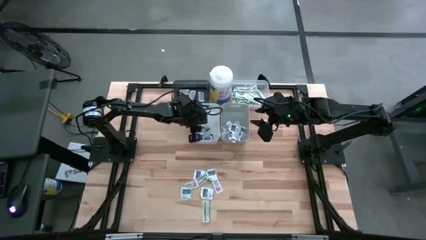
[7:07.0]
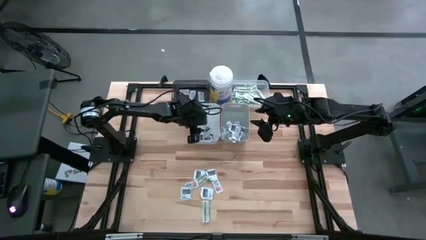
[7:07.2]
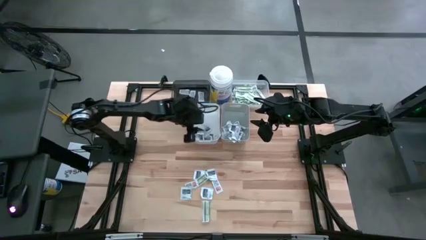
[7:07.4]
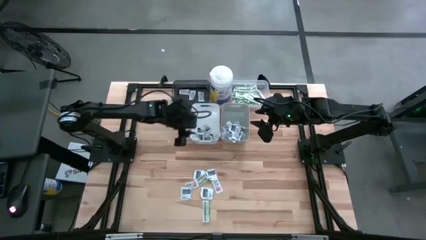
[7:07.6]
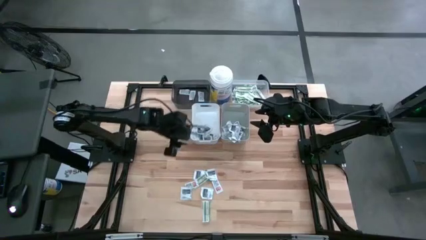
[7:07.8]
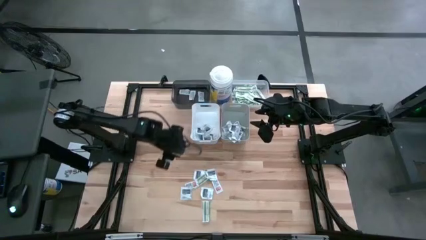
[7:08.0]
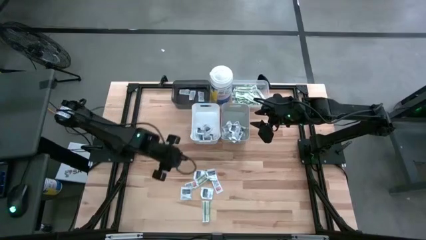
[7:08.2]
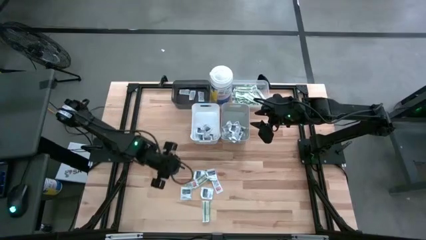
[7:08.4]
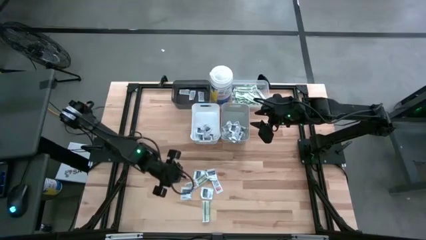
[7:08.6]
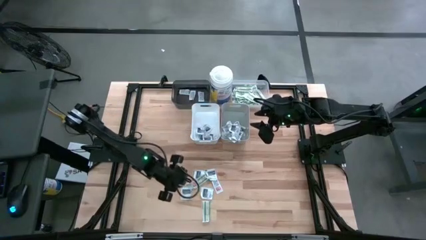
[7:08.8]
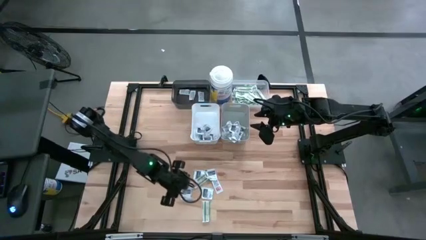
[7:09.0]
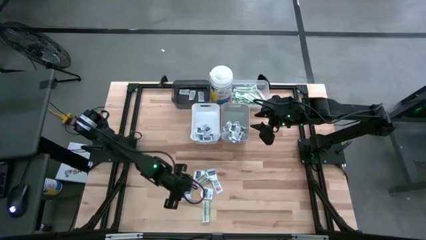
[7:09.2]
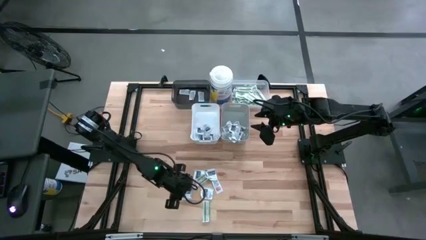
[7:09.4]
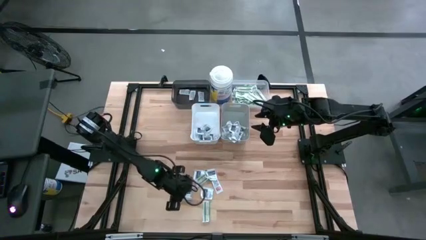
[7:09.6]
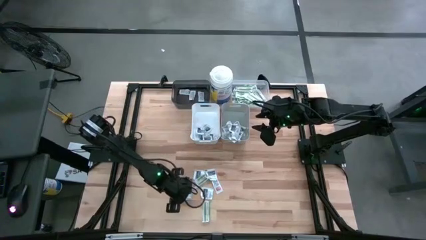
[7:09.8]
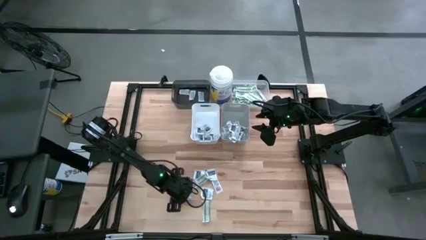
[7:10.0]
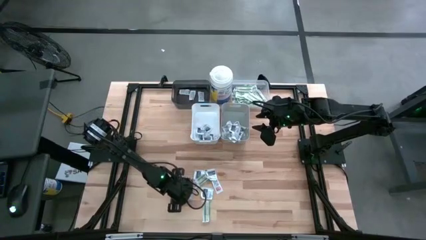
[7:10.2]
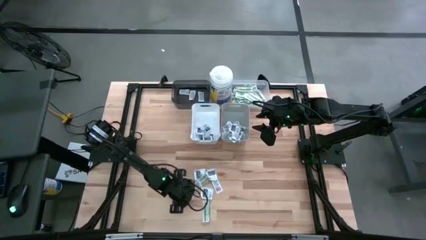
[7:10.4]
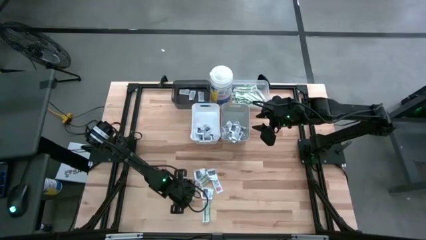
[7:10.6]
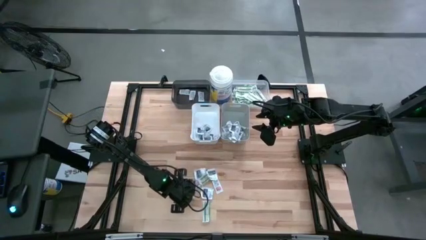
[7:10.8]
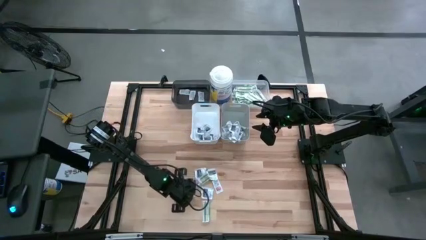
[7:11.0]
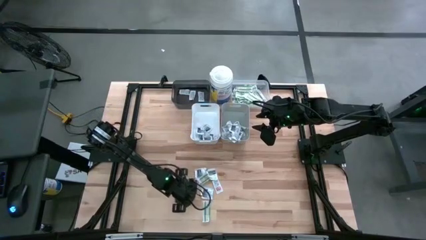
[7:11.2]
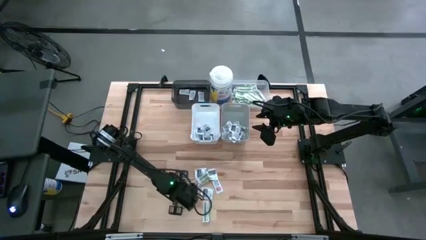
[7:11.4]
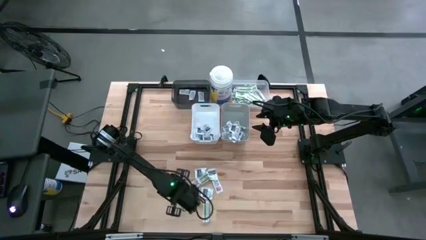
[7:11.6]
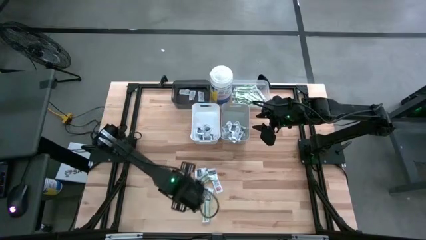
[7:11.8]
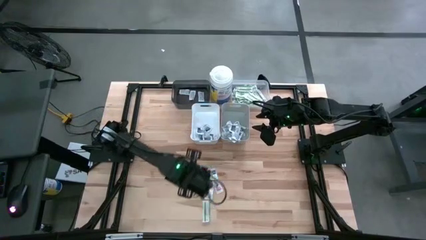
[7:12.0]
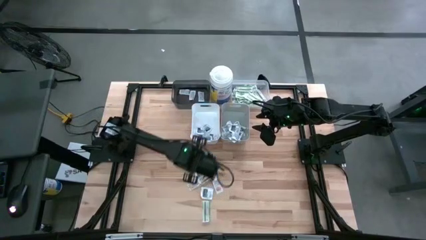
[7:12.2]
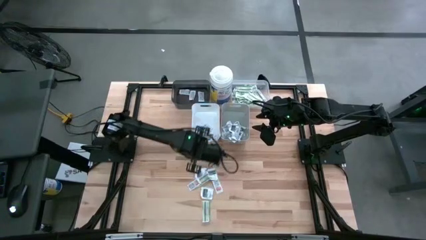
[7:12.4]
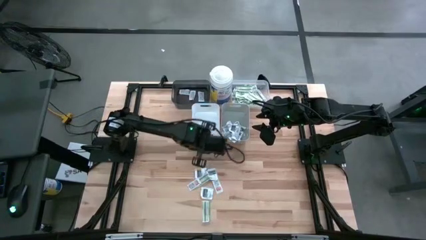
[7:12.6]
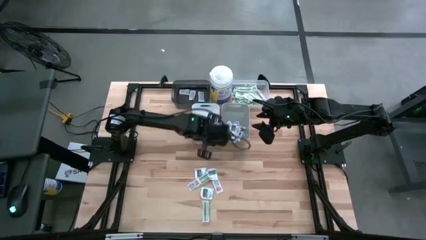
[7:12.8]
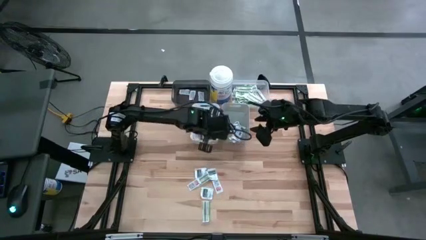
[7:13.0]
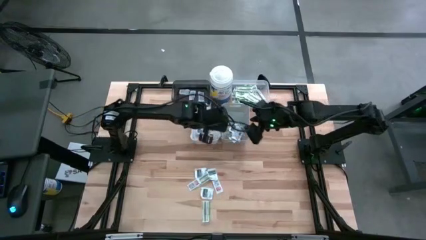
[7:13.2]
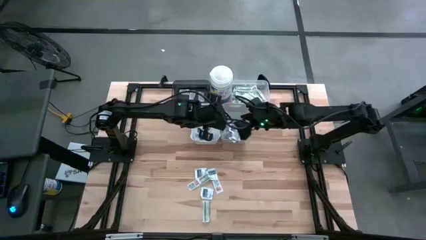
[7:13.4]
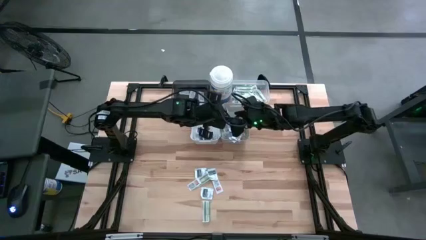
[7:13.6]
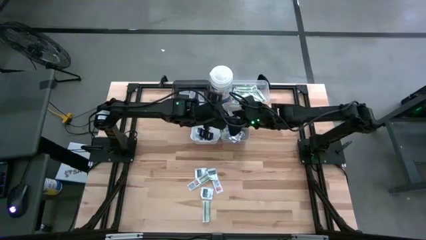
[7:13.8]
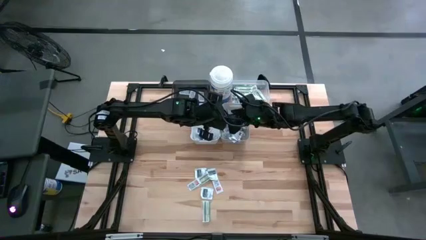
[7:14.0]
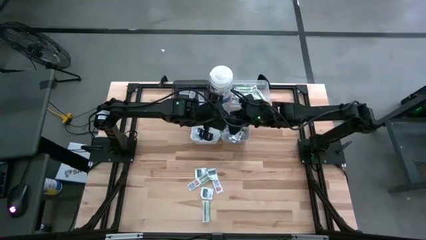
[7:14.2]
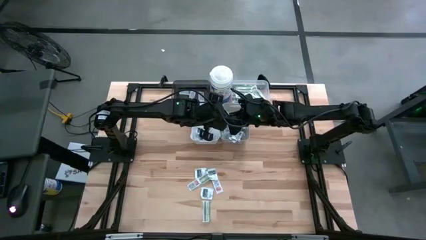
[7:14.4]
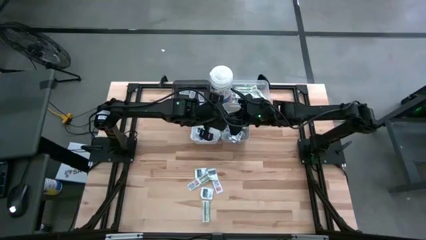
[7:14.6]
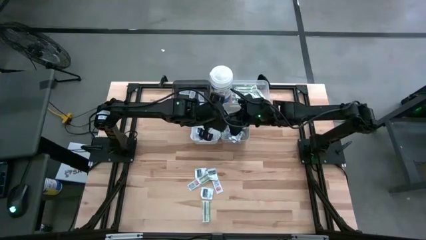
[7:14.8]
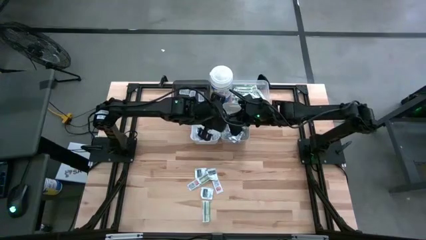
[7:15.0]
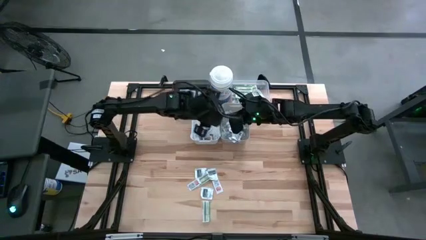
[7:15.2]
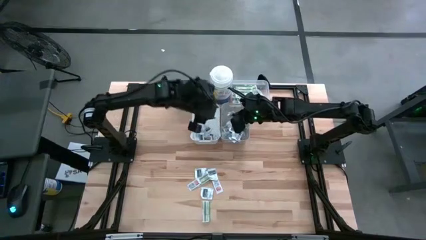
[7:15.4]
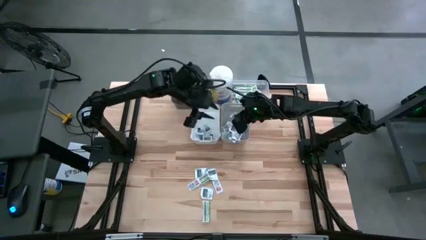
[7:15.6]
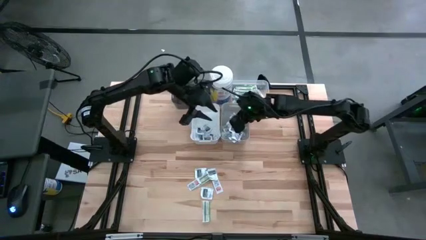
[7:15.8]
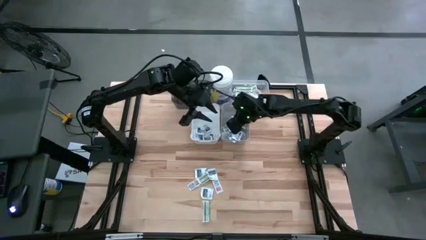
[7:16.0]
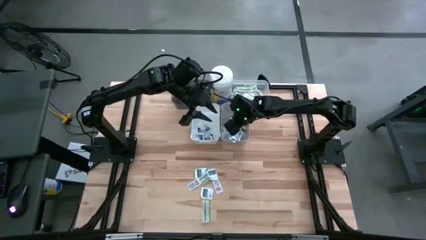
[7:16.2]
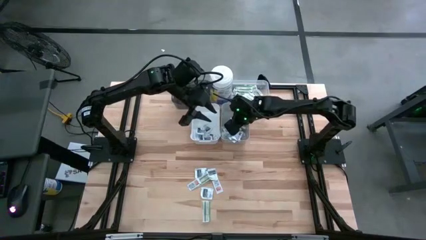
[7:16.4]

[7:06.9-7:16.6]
Task: Pick & Place First Aid Supplies
Put the wipe into the gray bin

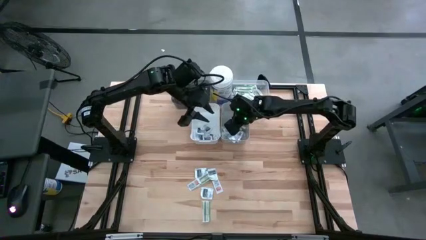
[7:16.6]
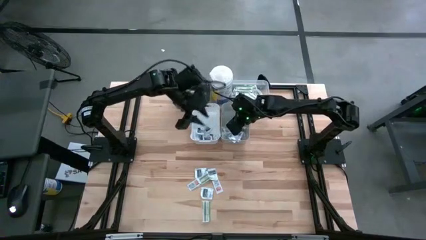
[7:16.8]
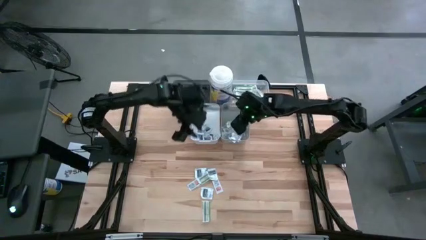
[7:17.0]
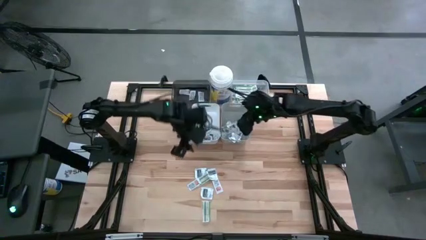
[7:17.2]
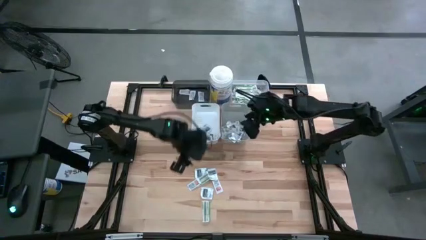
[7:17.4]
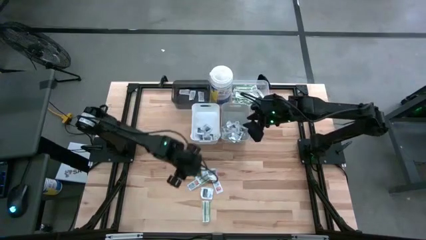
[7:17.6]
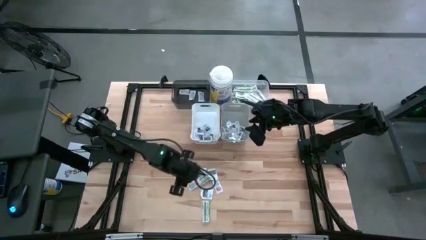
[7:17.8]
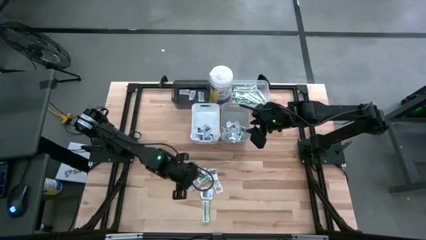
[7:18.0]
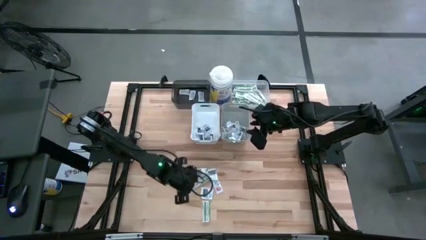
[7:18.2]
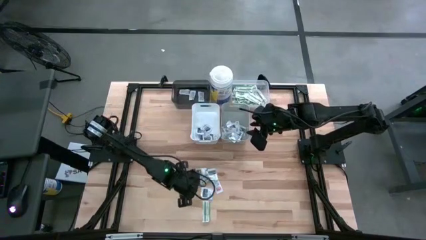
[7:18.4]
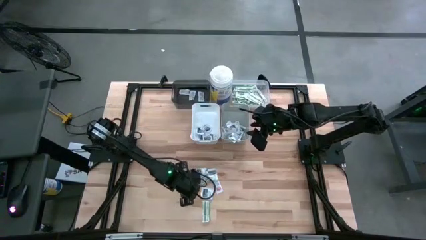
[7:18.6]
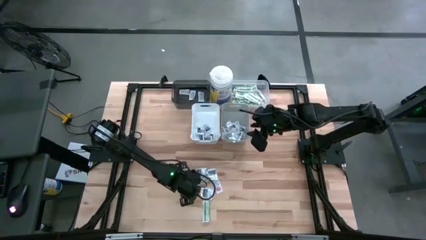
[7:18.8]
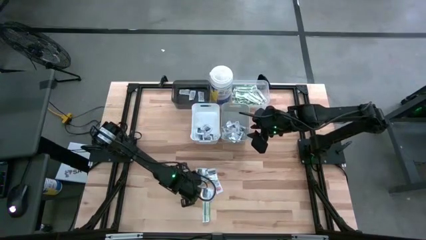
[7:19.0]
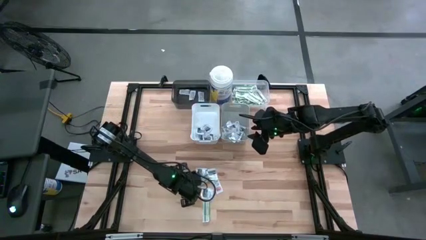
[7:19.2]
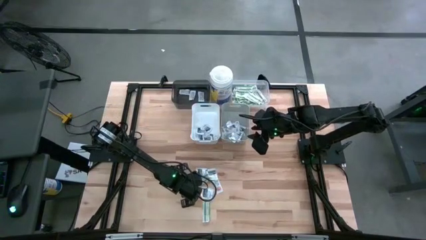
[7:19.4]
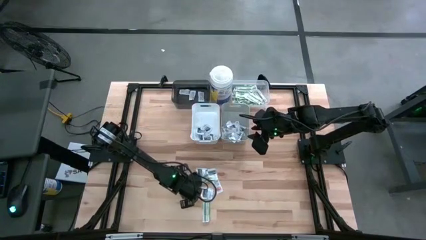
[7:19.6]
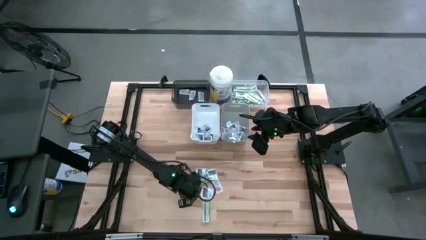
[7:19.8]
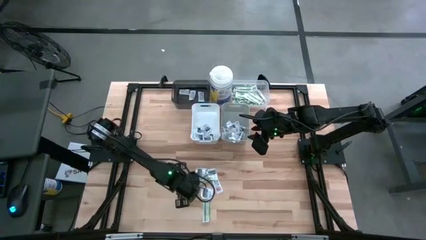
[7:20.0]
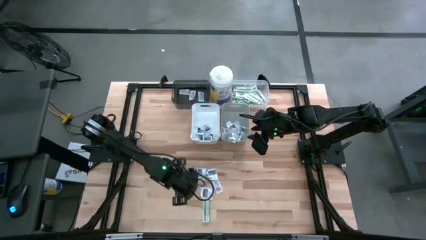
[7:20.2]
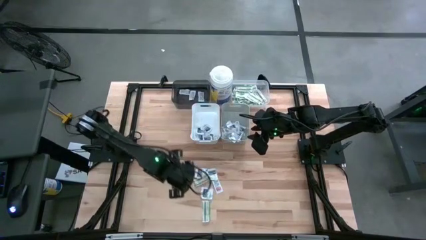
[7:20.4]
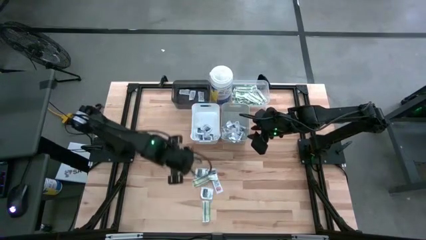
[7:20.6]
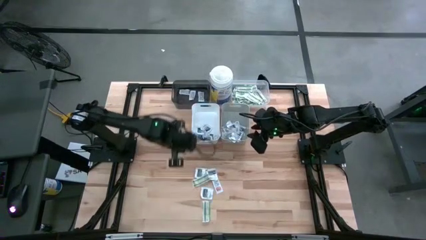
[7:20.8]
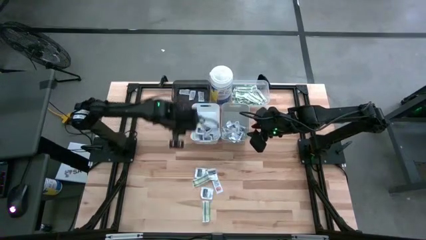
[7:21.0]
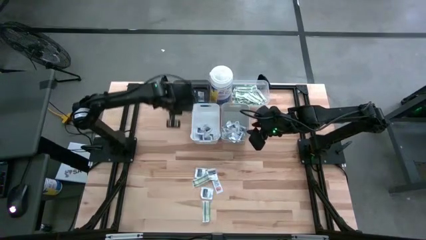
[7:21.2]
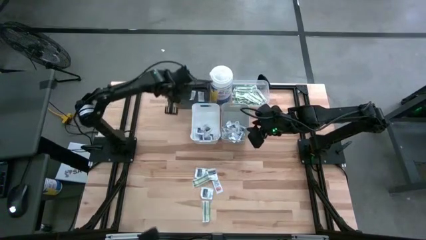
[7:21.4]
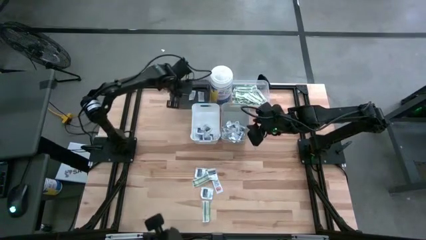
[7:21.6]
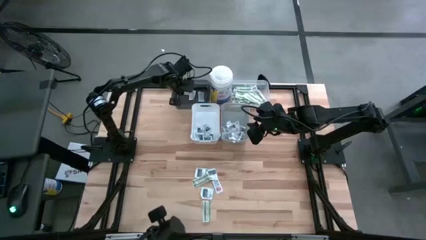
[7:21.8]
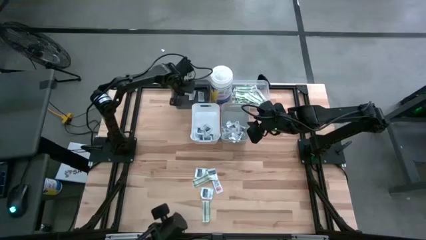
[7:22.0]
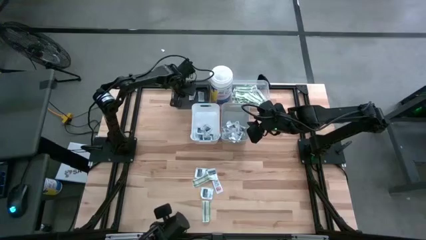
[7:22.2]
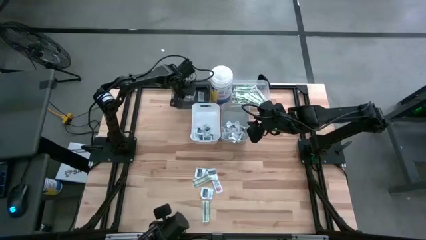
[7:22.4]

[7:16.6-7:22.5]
Put the ointment into the black transparent bin
